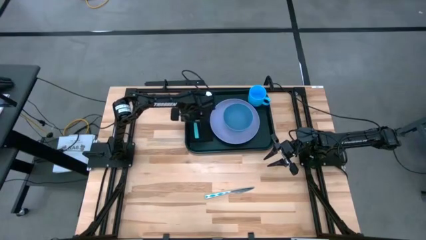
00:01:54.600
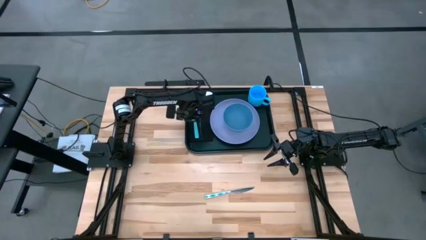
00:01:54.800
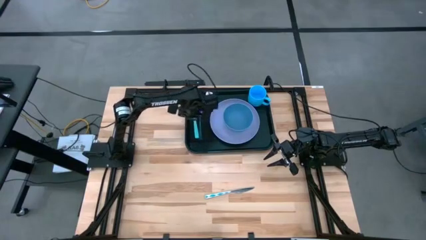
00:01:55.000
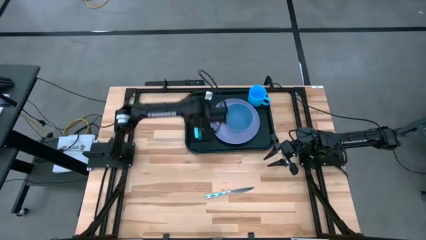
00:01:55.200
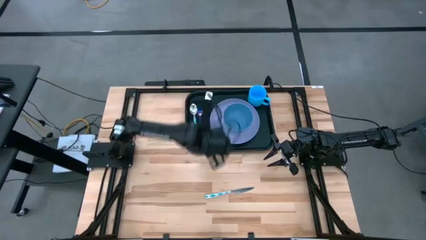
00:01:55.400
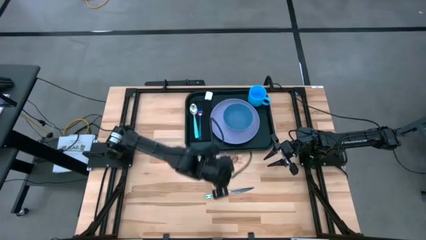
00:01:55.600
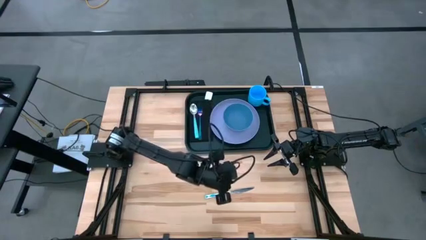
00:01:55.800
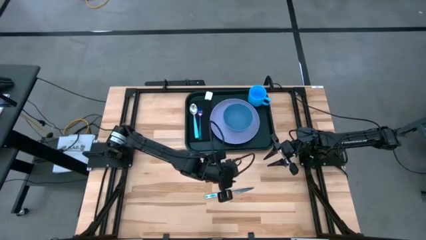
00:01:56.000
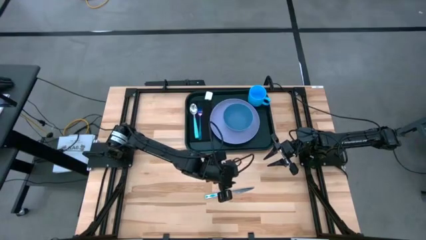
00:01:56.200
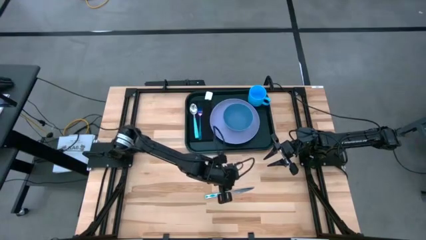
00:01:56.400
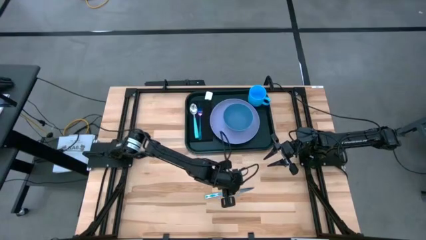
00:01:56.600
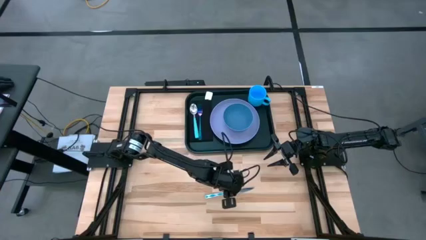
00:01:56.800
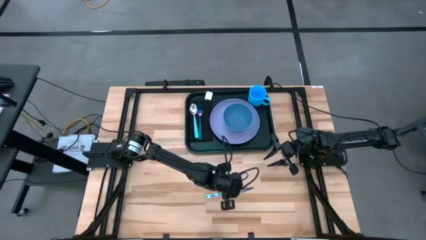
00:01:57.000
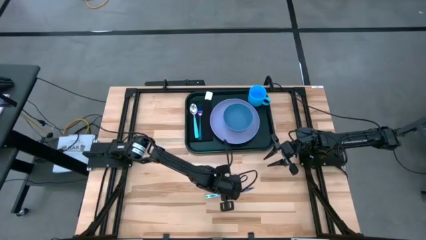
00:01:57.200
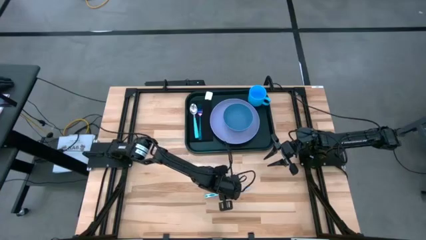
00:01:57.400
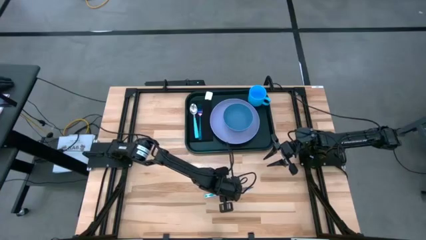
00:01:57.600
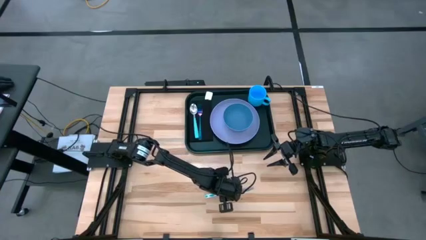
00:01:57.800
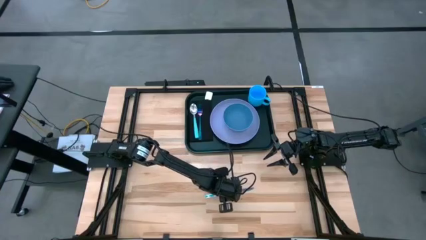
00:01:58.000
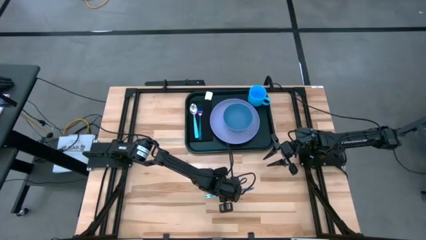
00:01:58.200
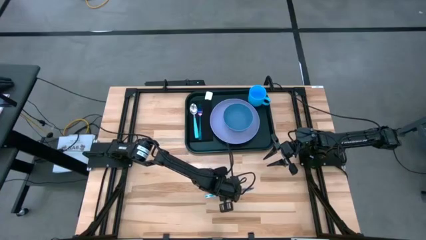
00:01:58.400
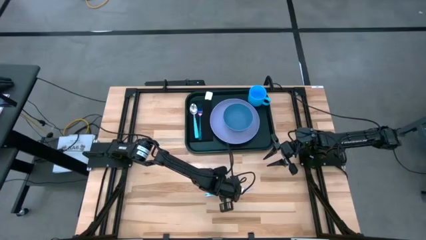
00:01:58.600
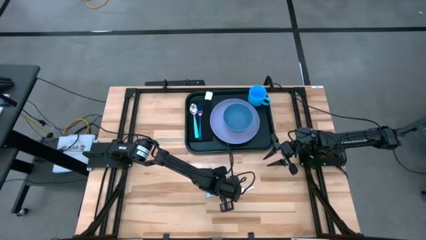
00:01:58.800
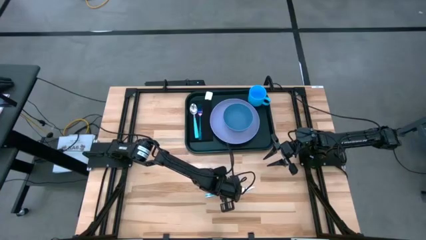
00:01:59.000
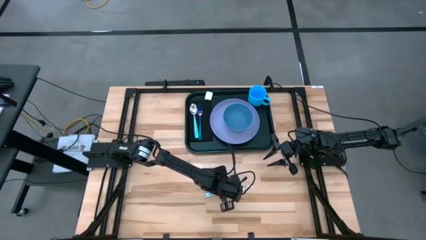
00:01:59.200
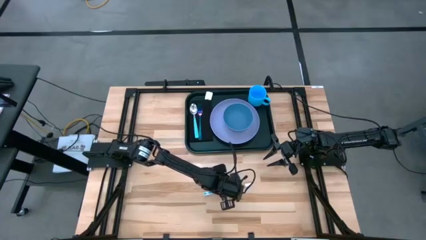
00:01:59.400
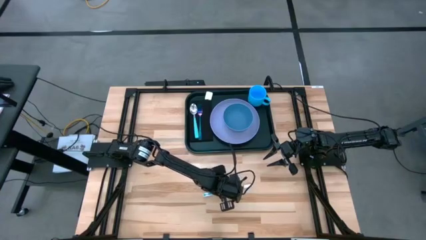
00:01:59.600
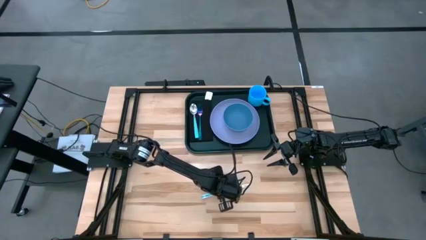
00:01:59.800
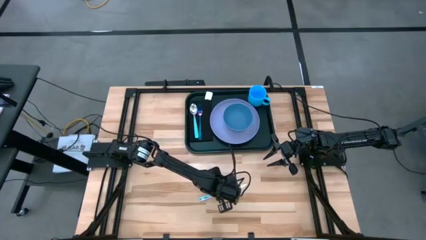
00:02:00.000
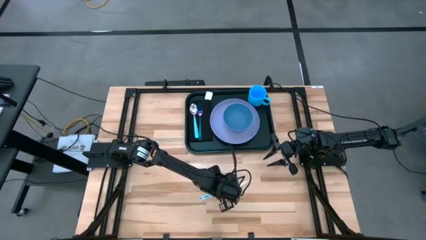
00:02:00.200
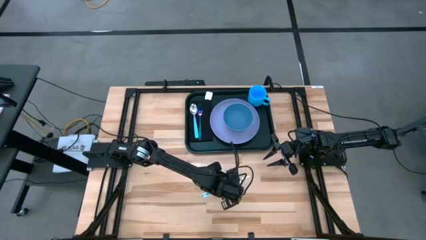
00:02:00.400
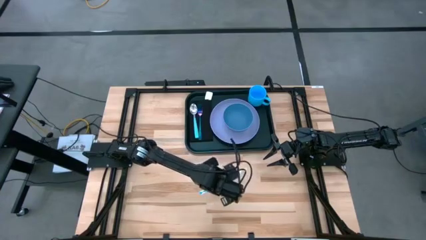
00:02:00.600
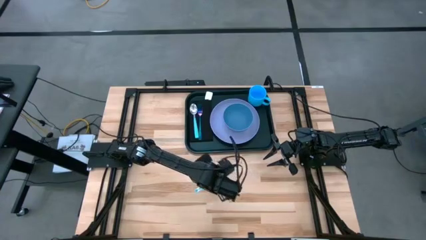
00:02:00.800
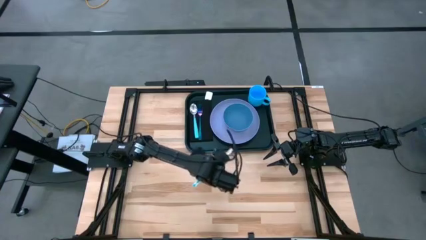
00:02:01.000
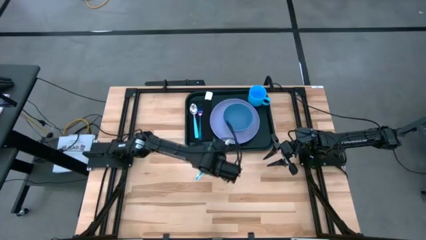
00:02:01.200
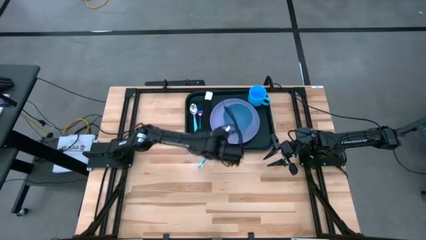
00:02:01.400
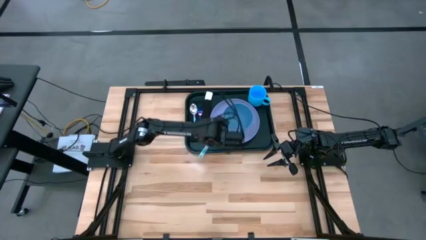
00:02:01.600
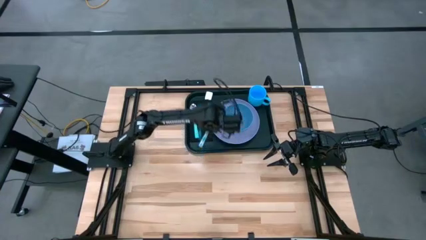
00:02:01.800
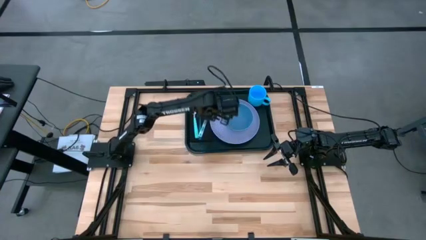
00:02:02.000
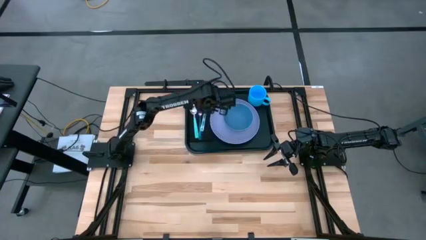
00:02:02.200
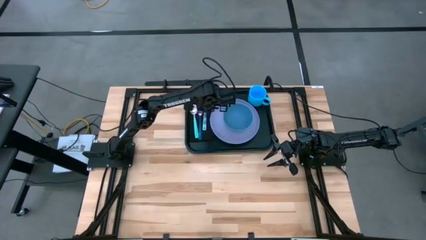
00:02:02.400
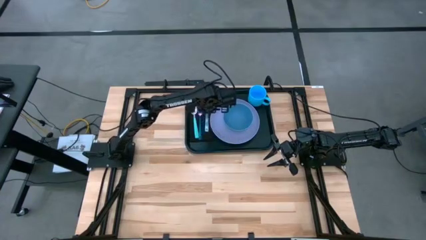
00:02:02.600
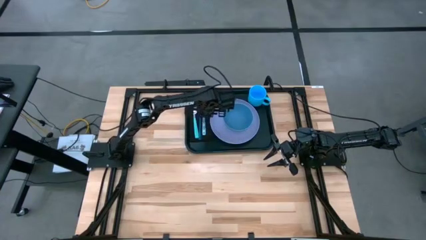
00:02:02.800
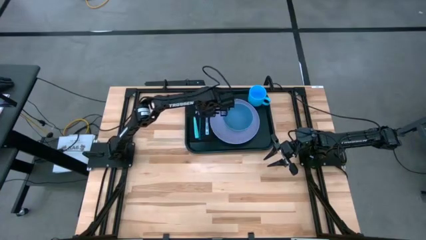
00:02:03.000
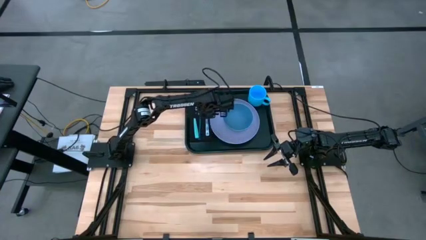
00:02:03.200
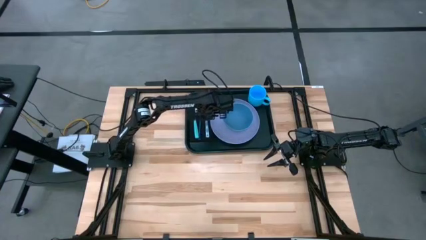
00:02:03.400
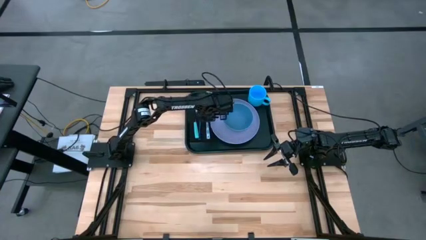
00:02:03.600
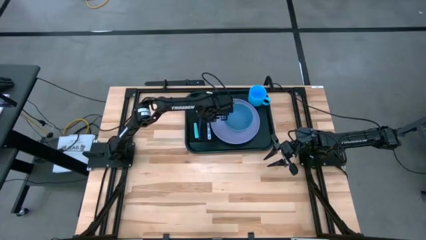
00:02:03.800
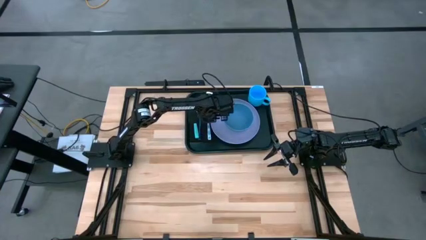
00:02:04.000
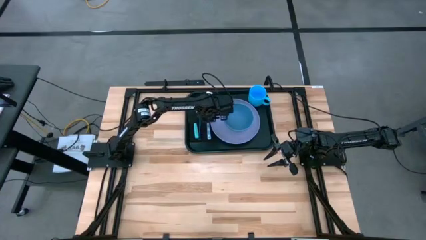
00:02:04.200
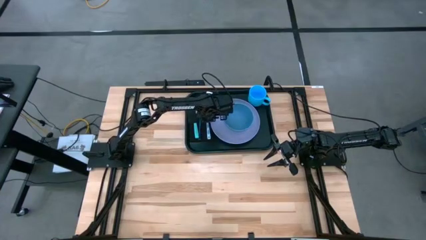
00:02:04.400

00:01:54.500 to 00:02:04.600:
Task: Set up tray
Put the white patterned knife between the violet plate and blue fork on the black napkin on the black tray

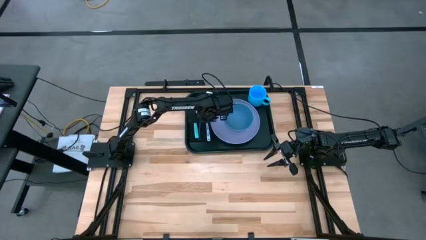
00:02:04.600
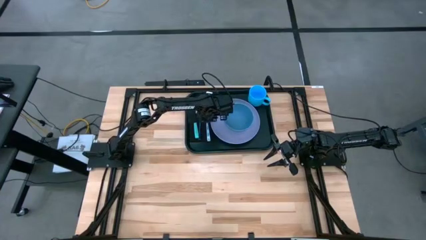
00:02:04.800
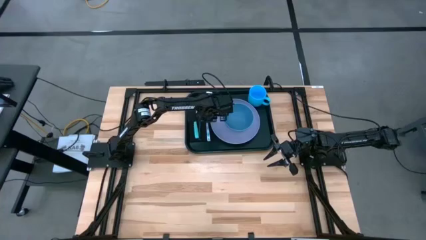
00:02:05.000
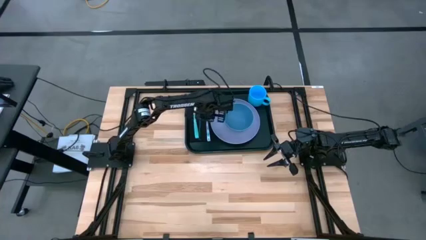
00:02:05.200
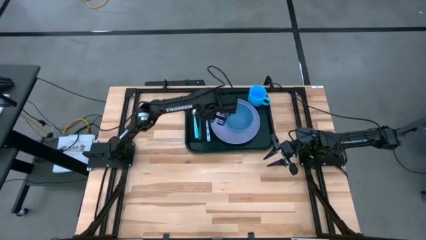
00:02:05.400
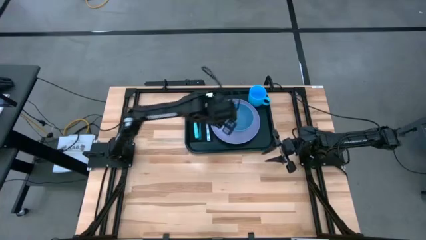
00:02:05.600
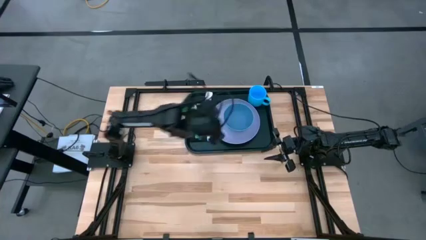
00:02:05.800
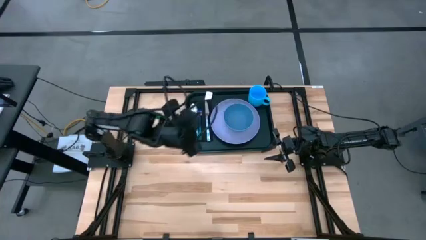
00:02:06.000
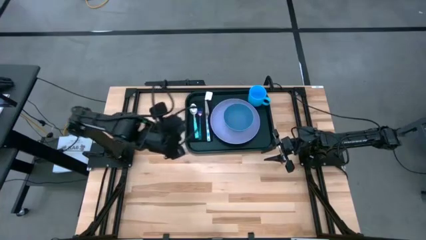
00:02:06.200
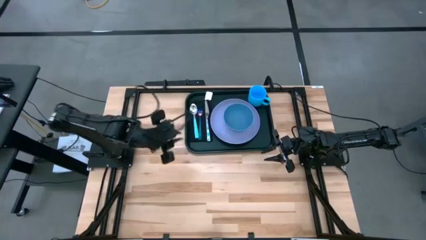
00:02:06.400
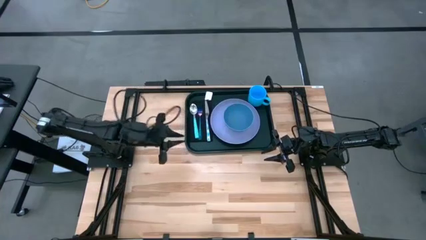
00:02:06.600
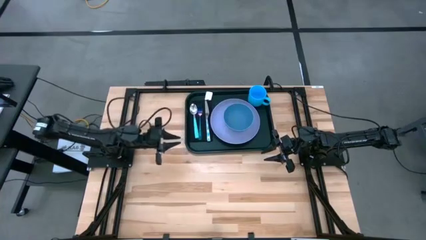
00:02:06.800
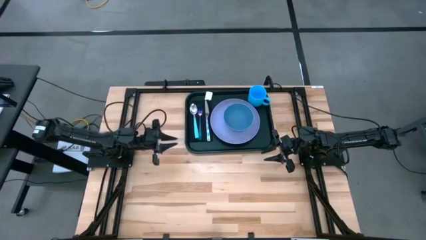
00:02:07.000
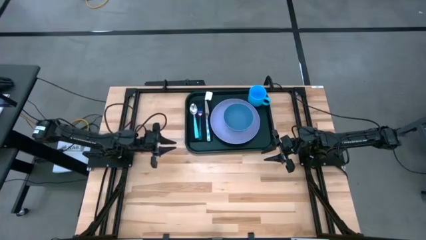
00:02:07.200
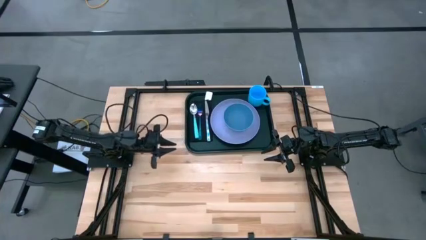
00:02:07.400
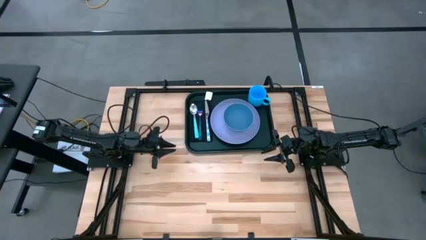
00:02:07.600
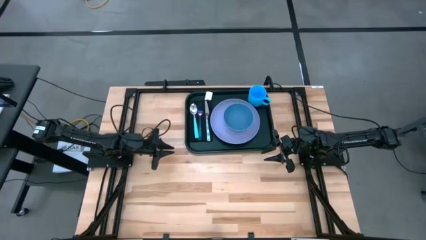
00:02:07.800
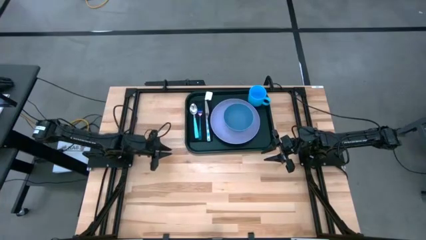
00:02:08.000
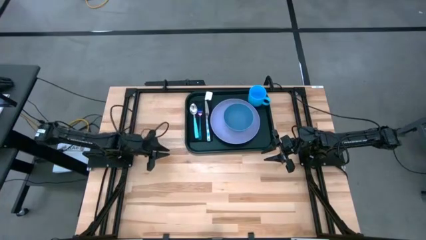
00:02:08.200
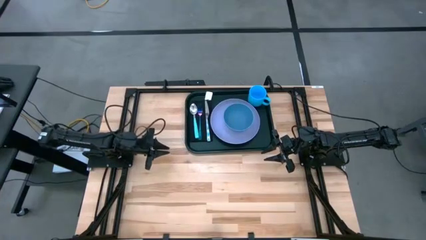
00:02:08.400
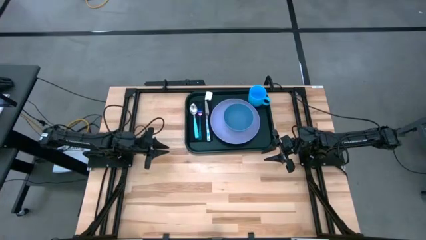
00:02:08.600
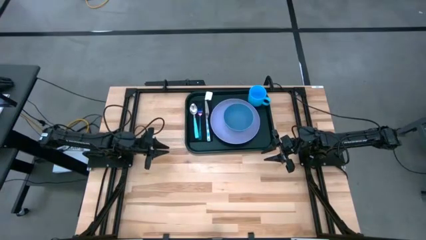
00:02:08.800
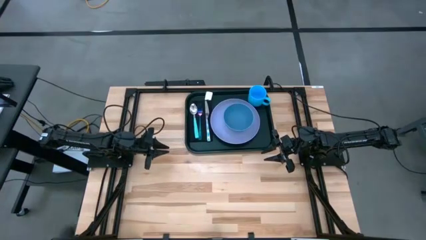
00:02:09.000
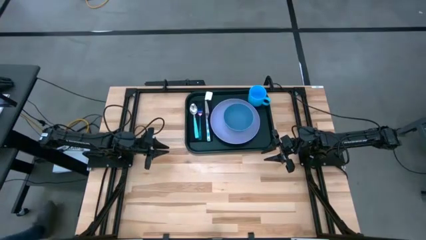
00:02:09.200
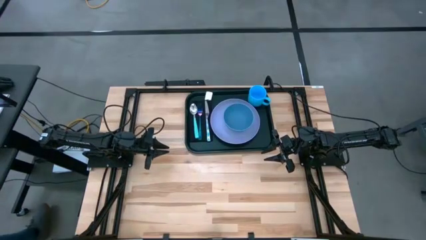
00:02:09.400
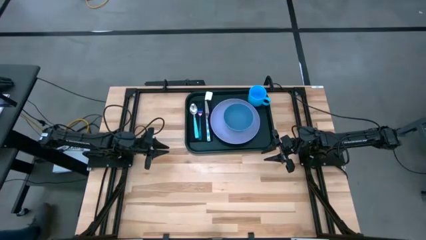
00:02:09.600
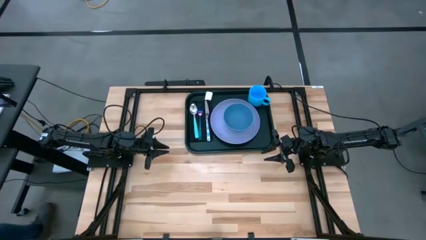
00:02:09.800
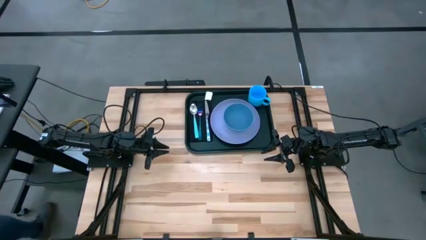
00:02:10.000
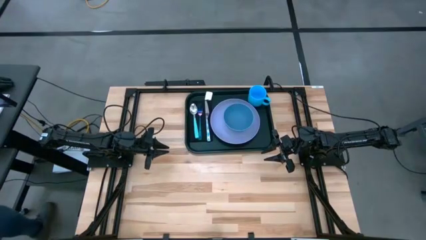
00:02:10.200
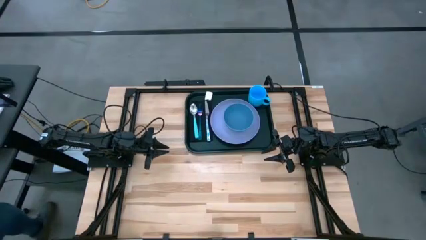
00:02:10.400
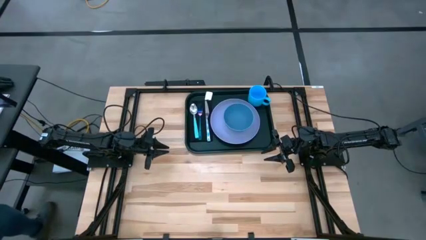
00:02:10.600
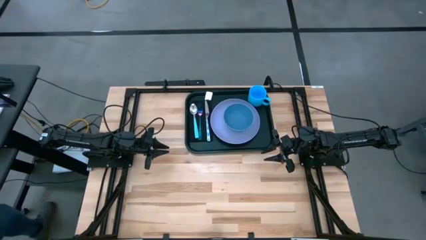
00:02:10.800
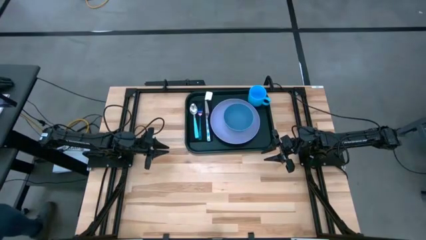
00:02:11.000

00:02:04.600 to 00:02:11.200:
Return to Home Position
